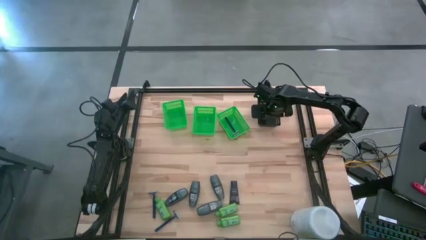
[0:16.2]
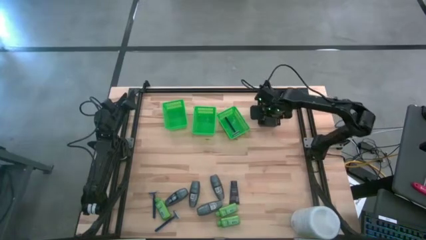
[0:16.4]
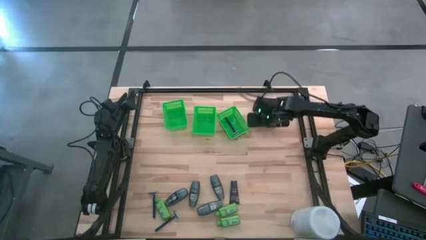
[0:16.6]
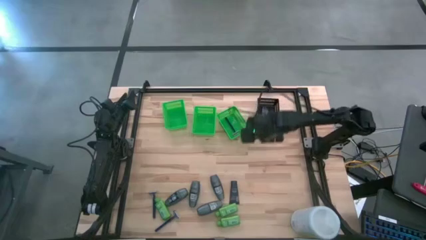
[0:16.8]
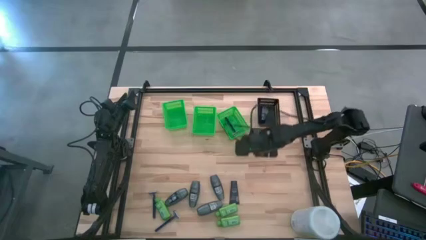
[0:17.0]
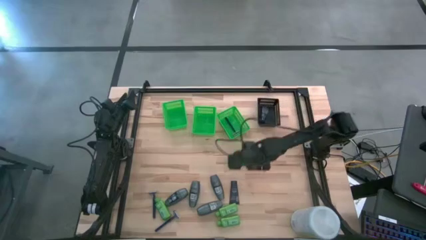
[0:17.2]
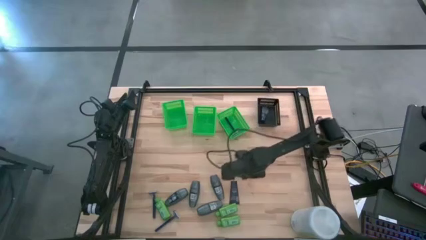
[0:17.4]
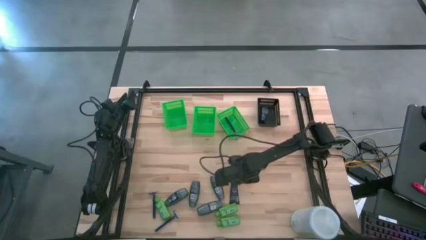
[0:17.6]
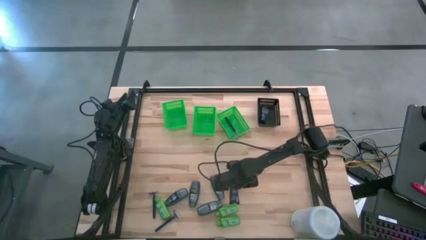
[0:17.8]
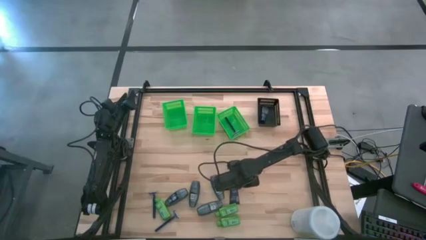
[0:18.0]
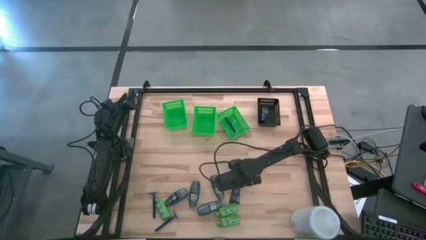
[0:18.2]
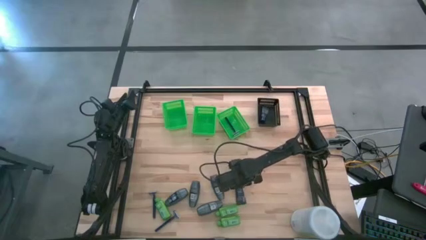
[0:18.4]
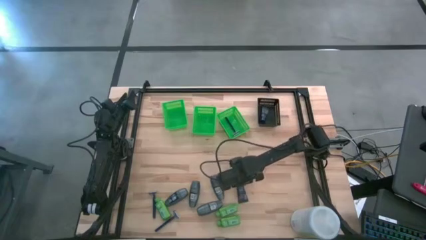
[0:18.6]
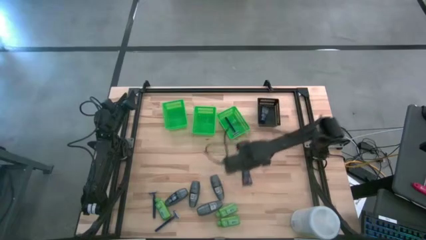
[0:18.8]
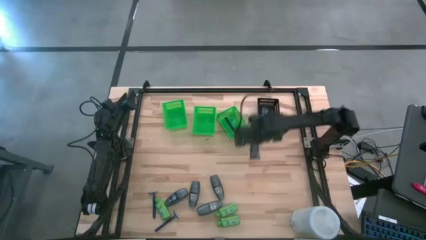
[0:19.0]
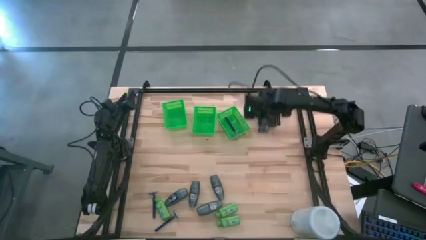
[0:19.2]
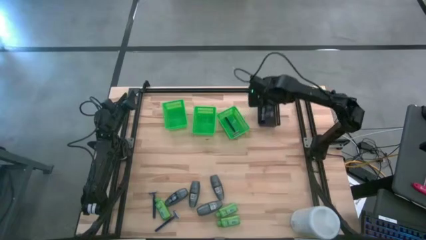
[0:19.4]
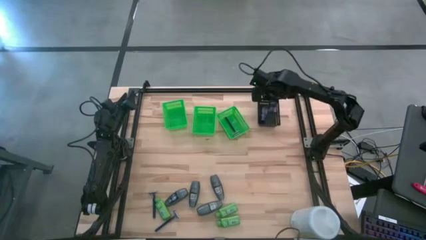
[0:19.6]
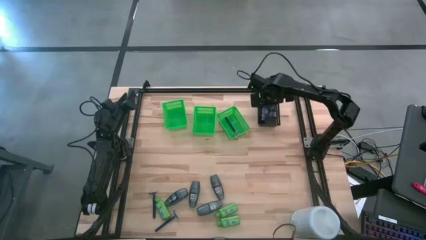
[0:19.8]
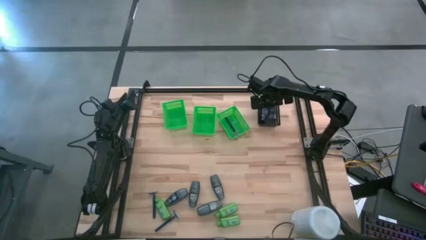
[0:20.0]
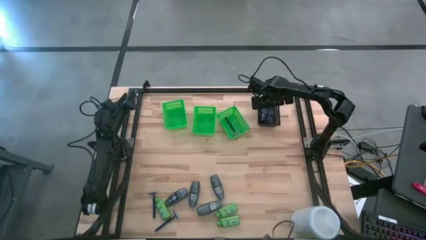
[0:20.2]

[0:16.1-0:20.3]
Task: Pick & Place Travel size toiletries
Put the shave cream into the black bin

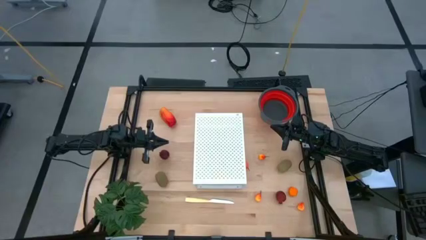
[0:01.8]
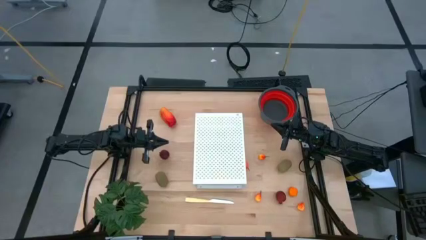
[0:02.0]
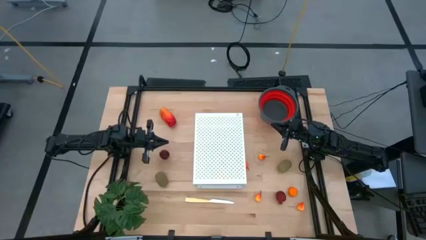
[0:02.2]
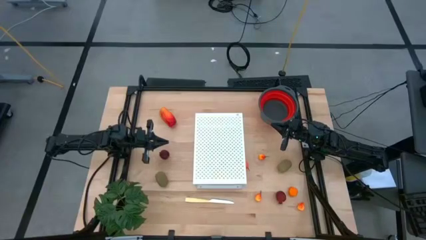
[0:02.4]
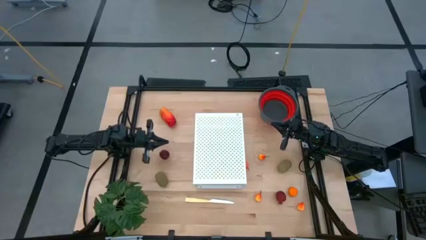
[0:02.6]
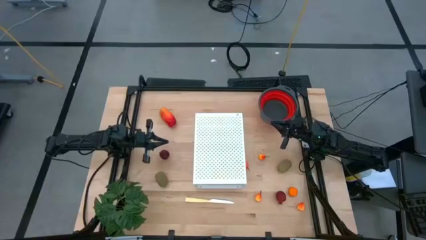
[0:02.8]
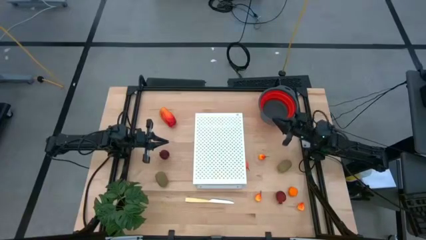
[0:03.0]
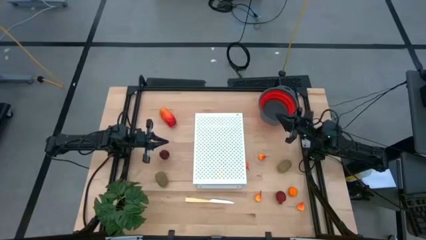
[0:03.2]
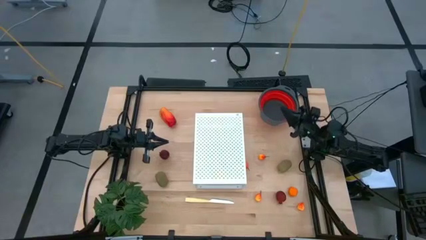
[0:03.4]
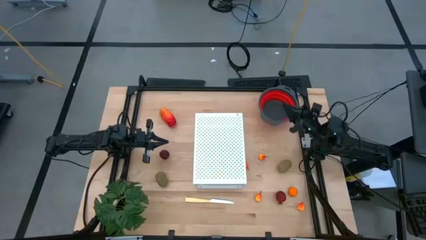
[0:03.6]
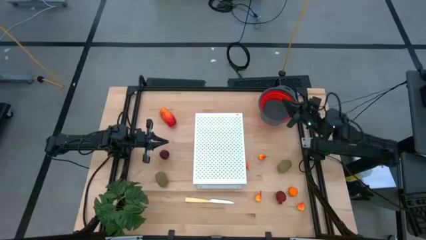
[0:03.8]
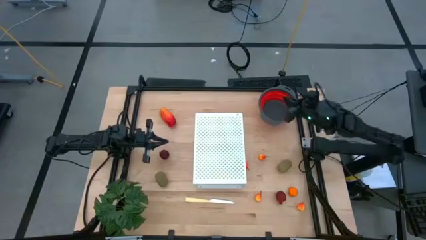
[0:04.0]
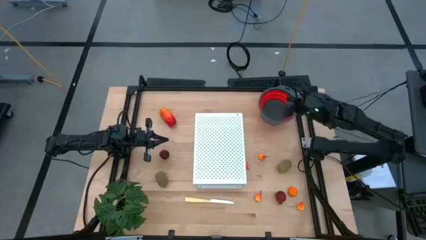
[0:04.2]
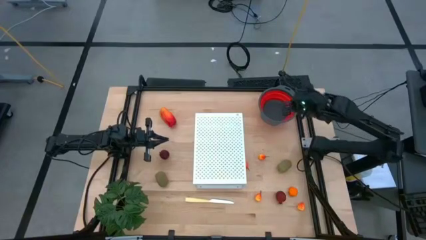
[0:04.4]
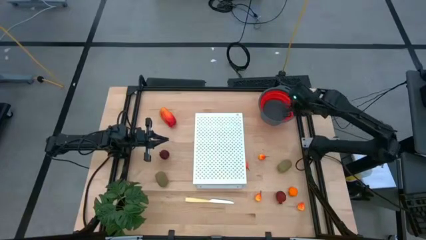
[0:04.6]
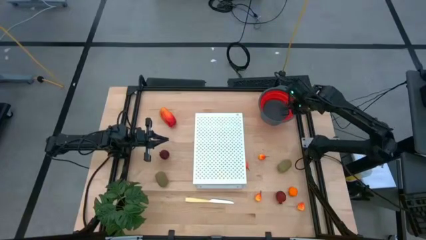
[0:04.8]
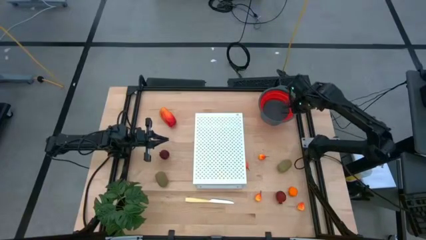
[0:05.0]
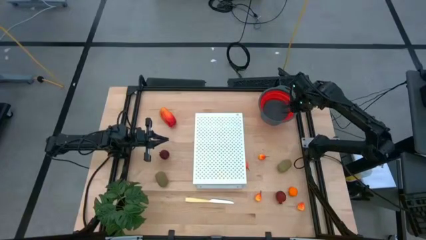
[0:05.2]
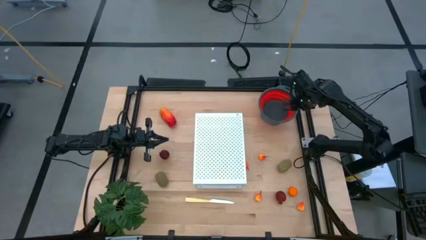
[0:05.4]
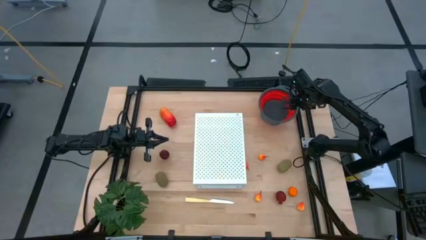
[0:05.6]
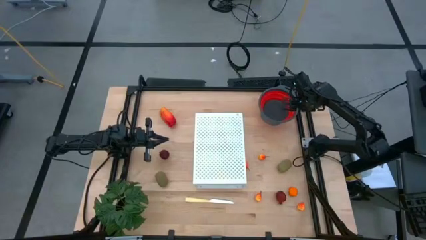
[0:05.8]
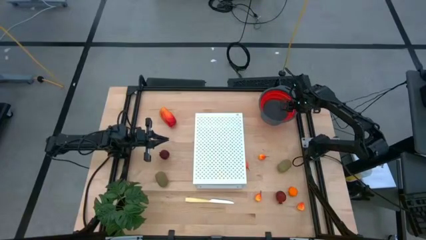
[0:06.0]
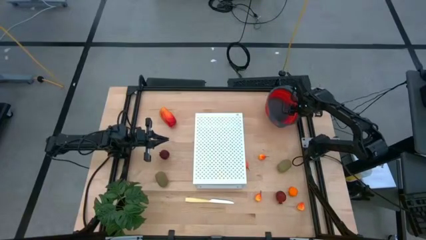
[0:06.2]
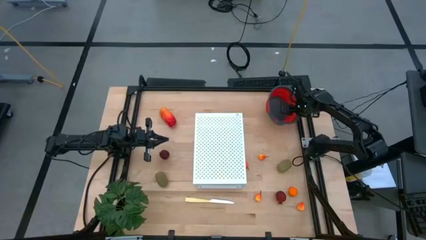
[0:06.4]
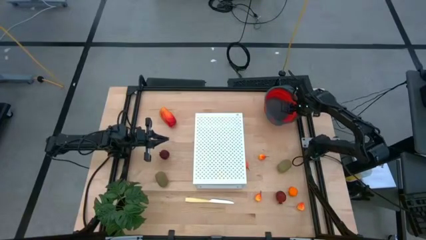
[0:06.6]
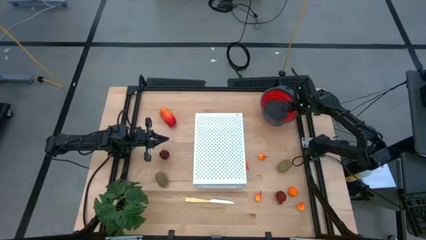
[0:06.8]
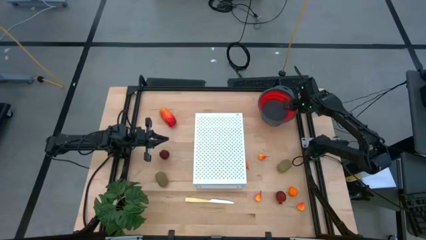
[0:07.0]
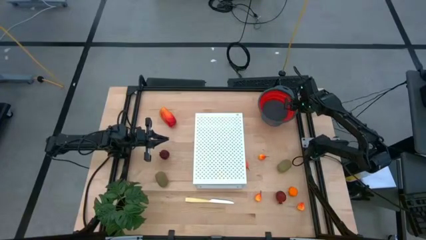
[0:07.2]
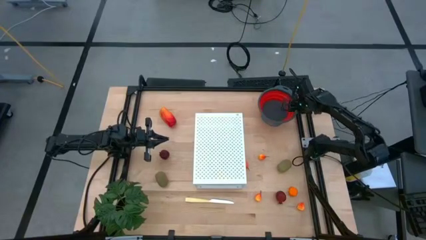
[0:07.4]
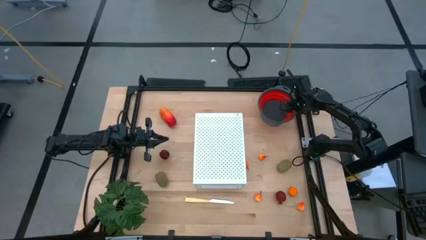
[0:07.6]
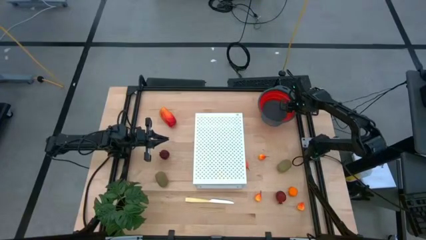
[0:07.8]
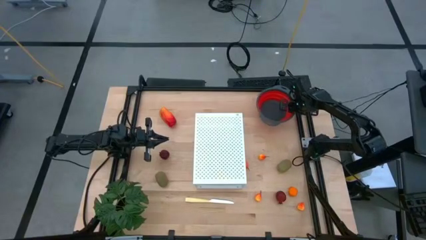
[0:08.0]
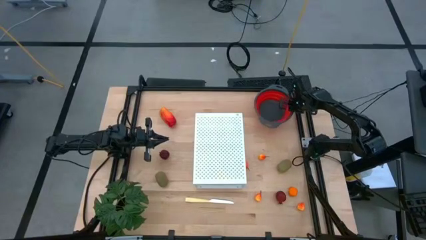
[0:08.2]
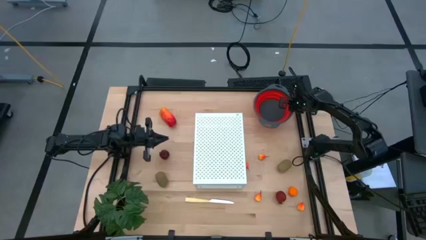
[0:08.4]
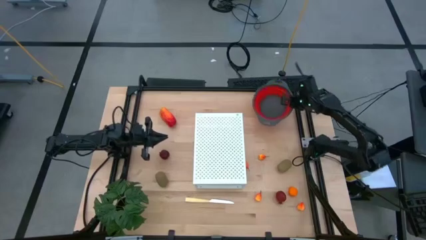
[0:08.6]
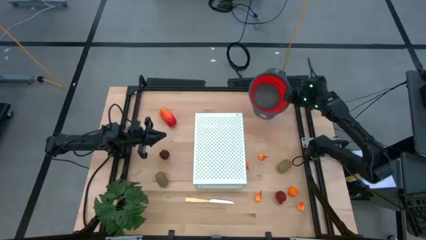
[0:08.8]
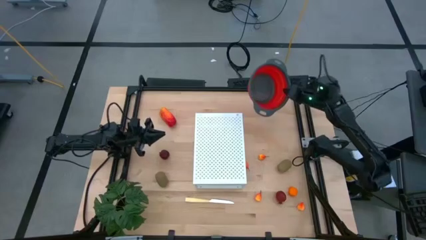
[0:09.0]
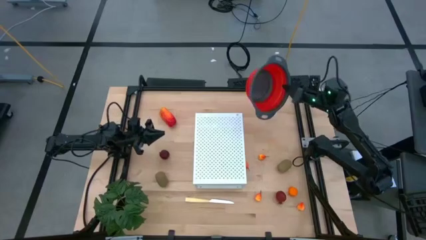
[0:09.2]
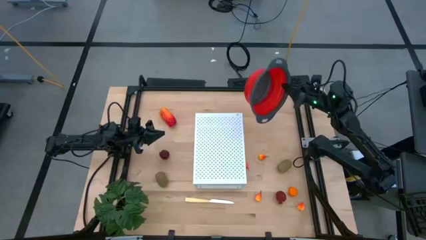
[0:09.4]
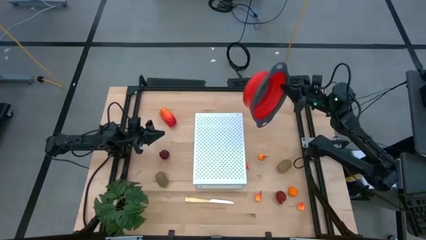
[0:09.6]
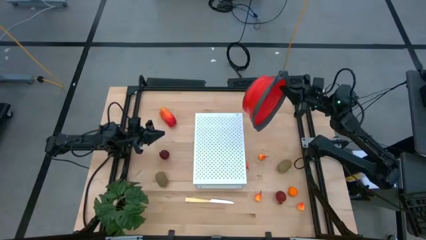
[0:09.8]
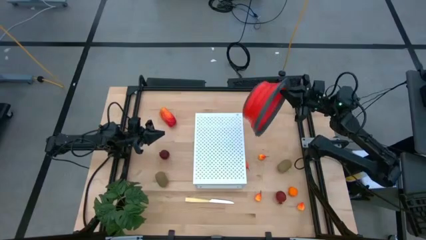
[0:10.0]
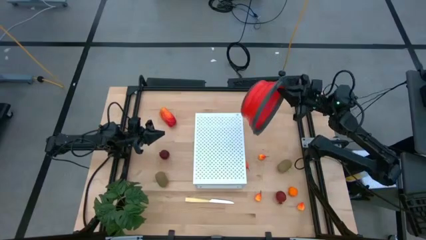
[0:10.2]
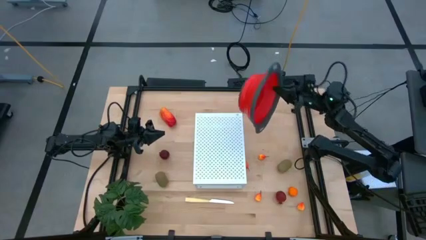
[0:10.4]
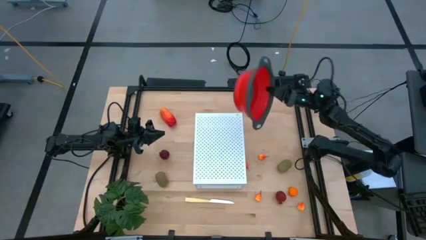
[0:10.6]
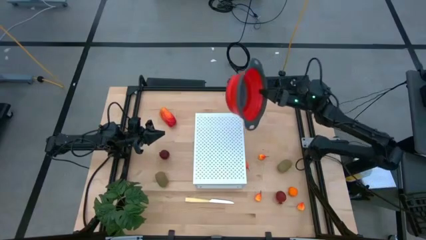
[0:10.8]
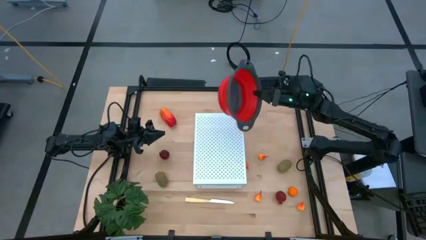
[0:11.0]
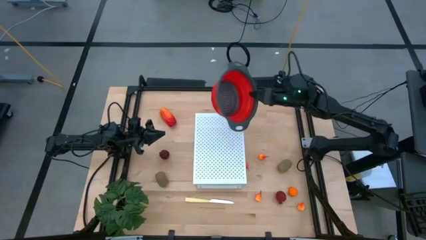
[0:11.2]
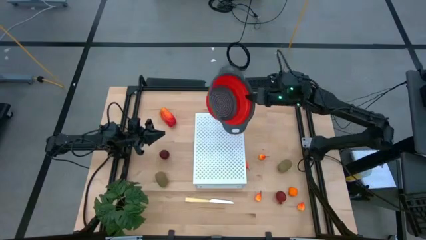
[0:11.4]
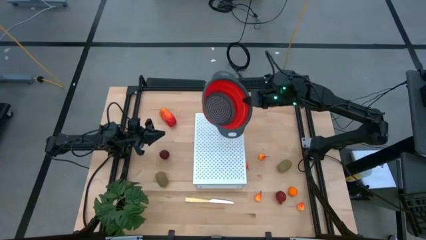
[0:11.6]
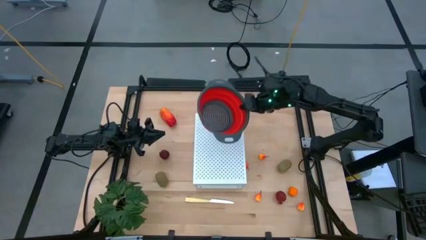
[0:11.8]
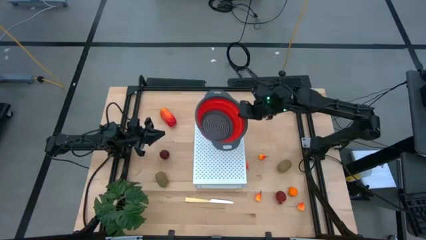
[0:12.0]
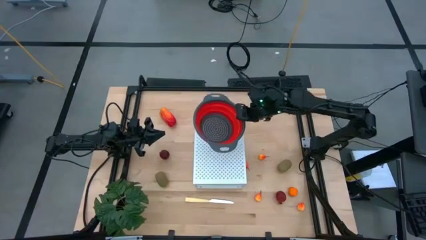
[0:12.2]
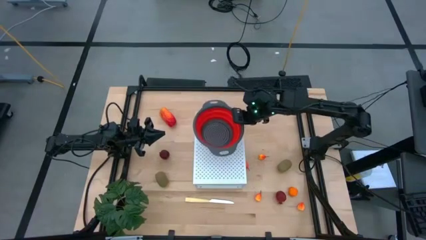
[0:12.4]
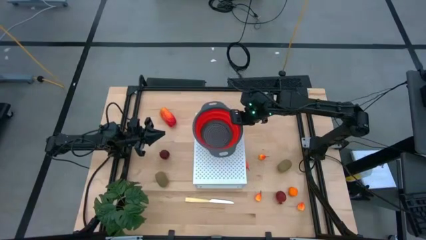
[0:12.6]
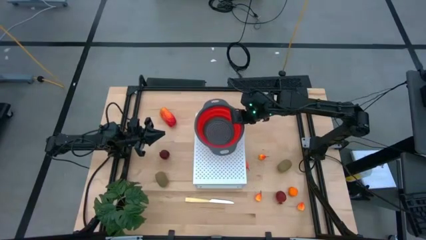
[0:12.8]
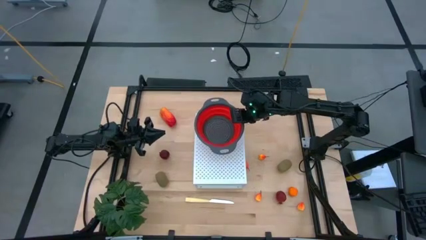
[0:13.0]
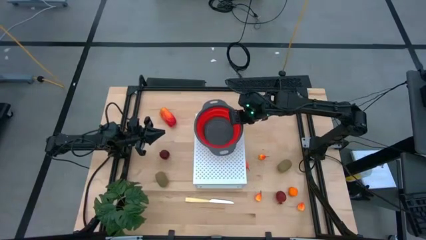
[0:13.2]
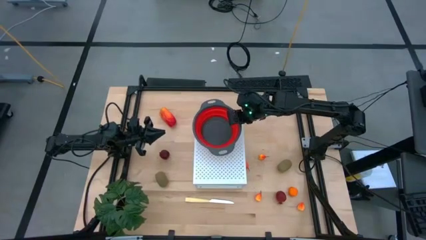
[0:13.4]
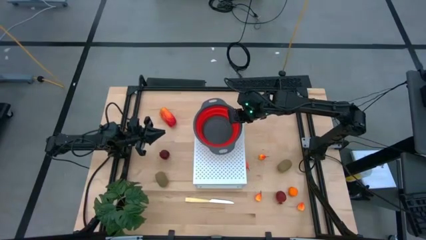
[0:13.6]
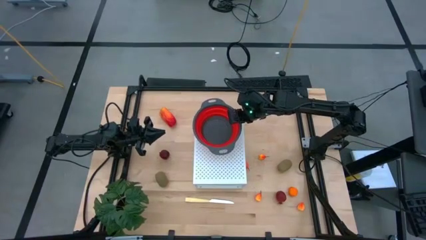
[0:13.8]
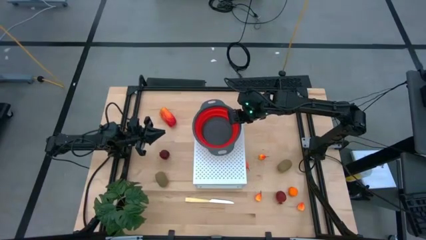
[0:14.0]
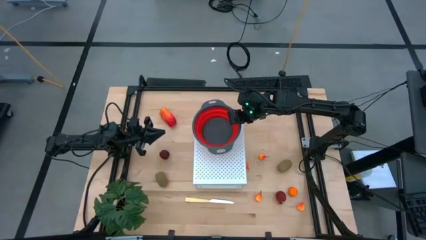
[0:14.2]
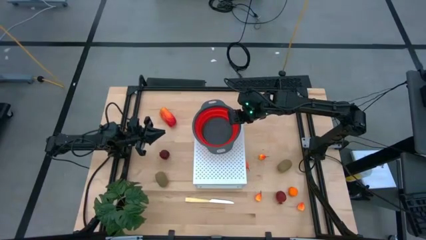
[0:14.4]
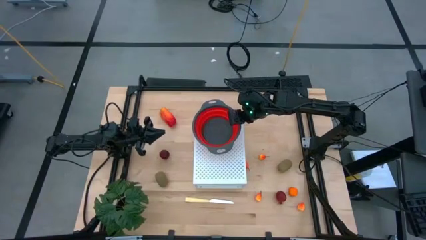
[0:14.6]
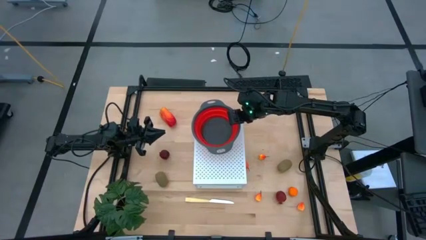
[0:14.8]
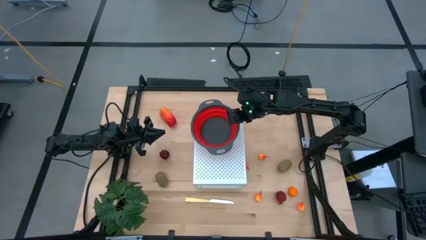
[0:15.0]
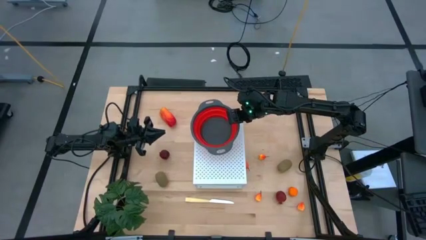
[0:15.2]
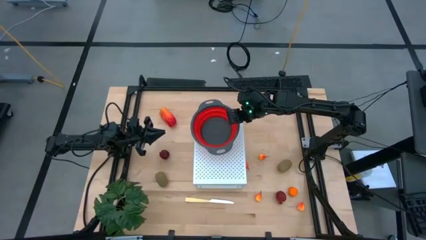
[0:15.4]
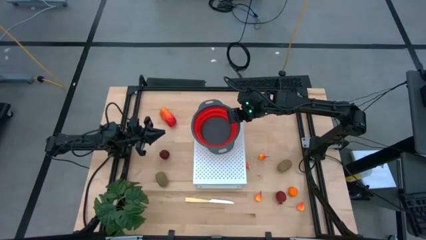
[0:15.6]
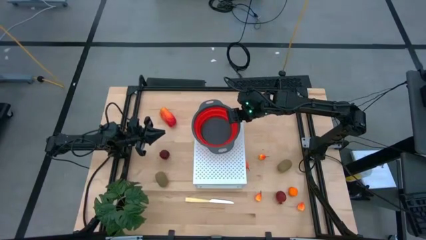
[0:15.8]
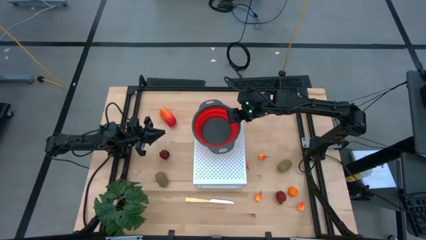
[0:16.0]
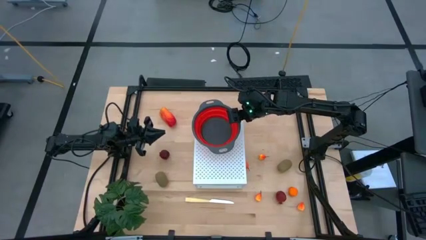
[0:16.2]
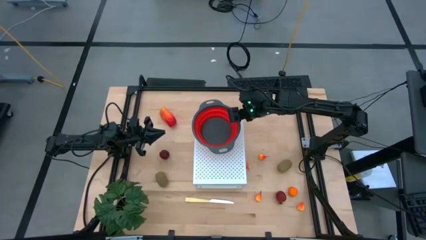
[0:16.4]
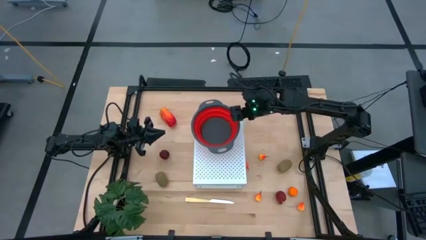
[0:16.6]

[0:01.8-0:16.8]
Task: Pick & Place Fruit
Put the red strainer bowl on the shelf
